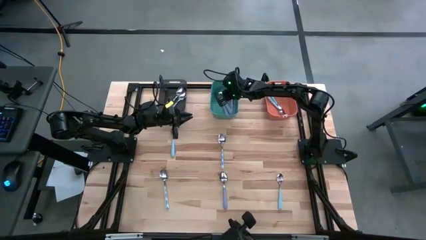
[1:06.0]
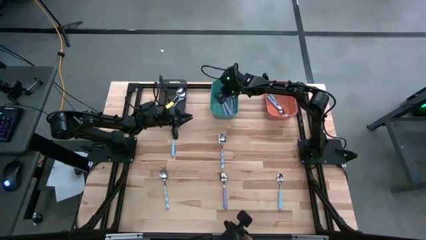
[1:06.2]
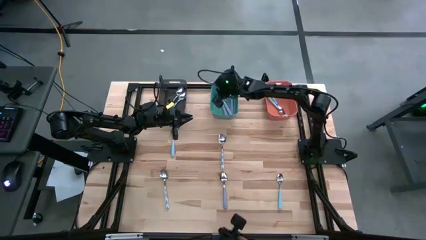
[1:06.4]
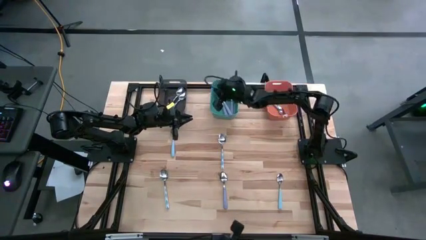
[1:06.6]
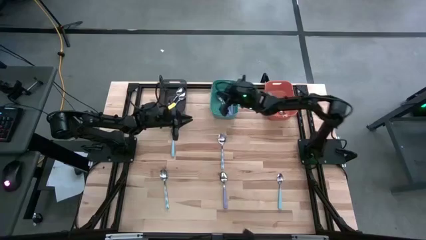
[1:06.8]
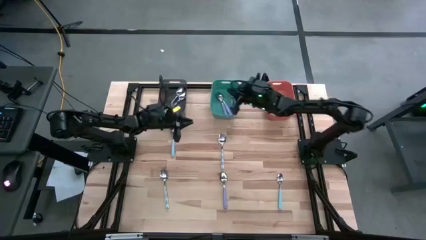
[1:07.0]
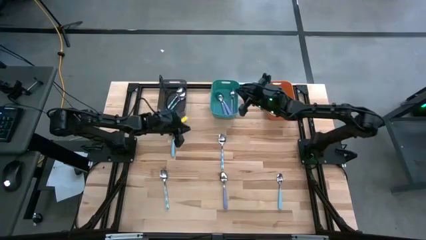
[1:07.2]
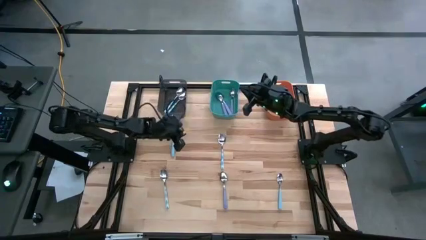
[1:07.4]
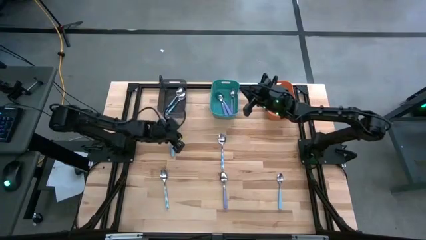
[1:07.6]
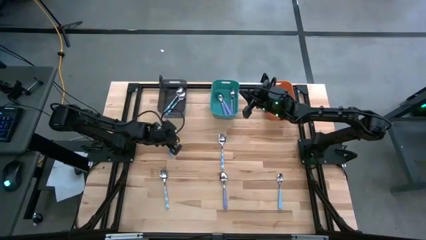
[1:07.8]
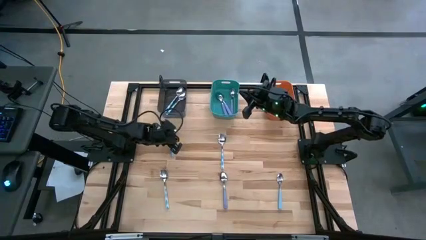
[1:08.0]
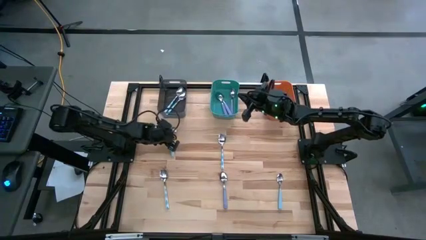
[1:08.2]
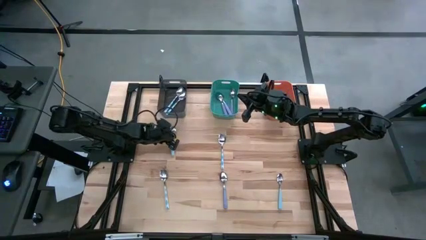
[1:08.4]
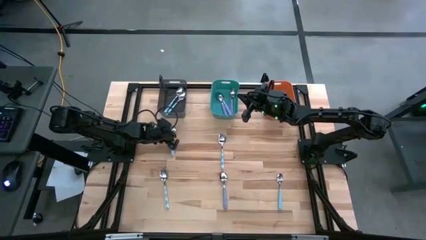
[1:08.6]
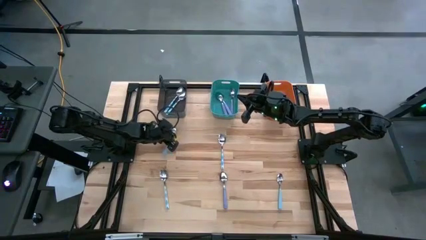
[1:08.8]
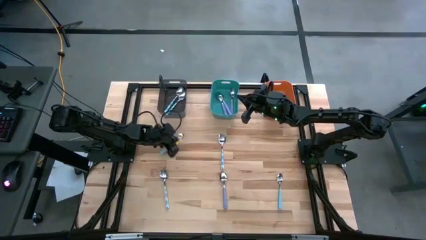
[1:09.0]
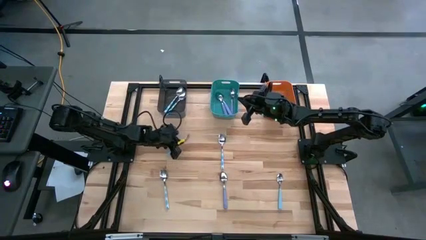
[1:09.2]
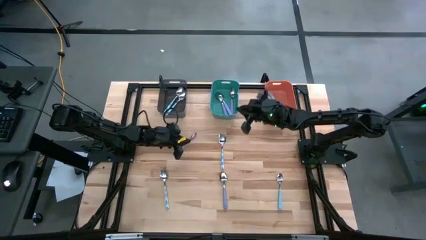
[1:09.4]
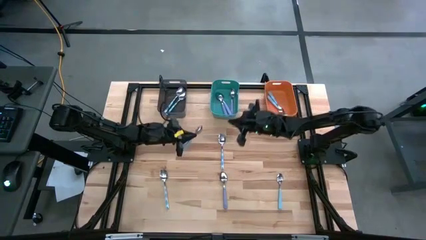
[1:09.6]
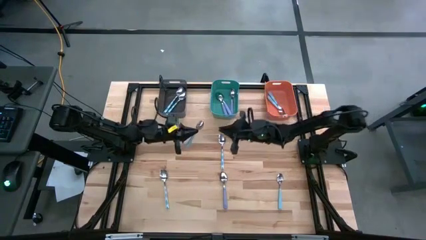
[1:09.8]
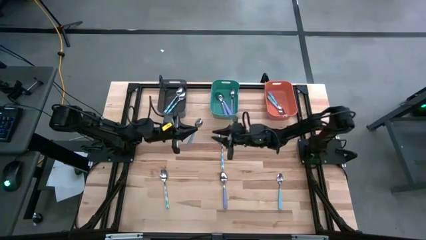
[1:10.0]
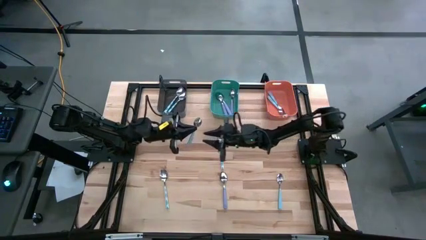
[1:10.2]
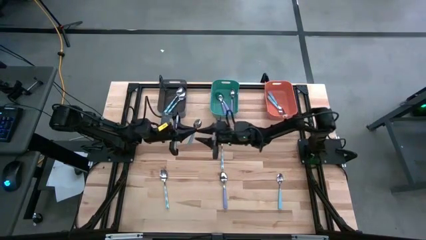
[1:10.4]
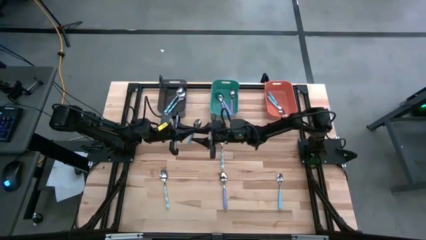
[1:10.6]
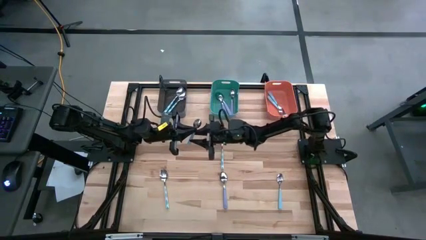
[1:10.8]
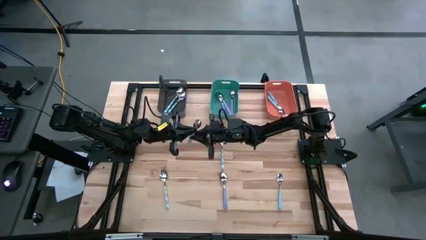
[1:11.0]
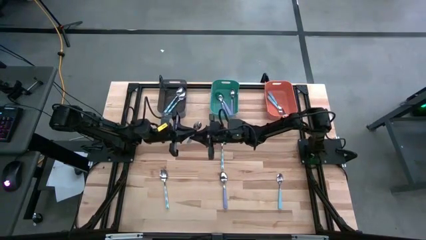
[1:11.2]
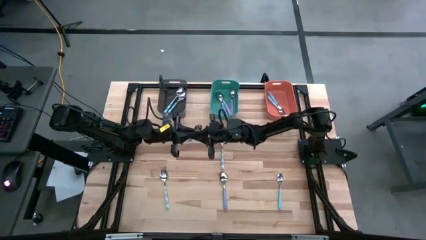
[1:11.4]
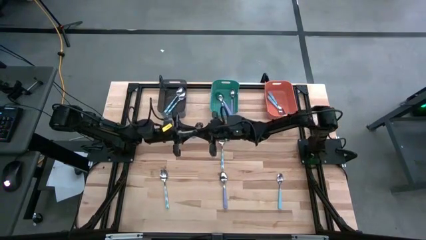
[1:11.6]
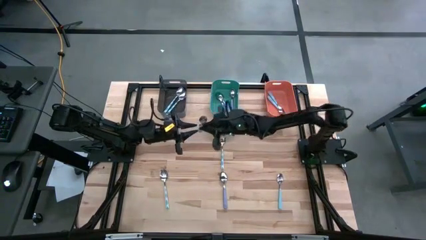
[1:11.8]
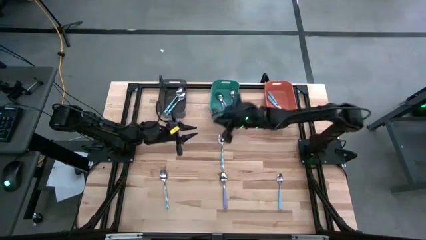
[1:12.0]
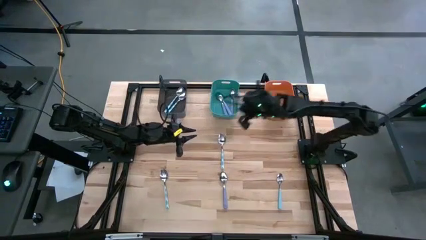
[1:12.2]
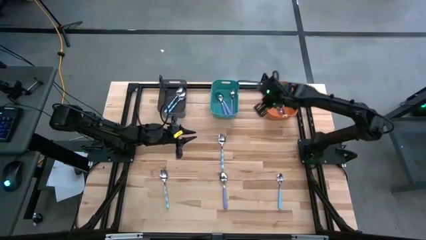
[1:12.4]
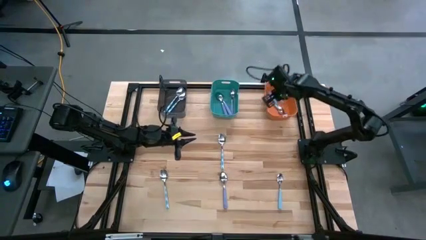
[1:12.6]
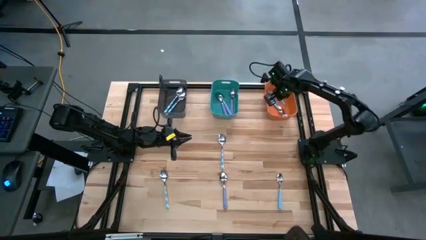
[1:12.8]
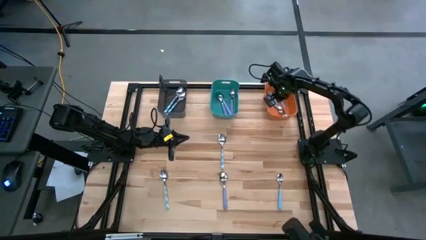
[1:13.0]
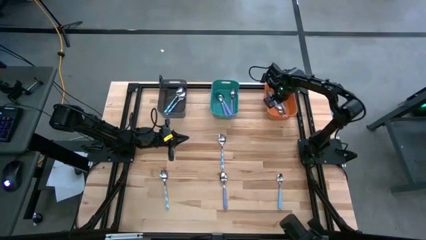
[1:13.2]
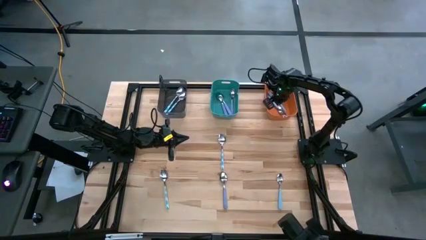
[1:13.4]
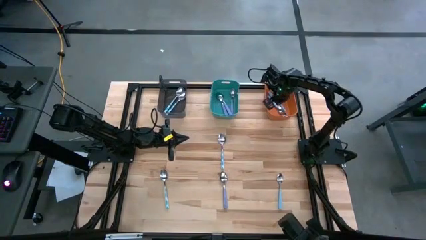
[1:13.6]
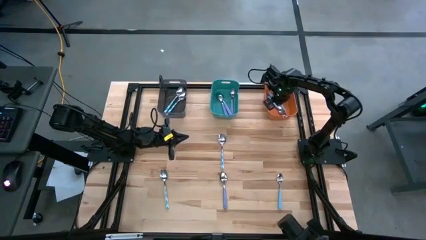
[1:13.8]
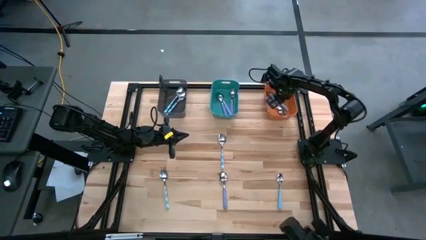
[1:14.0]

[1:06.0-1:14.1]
Task: Sort silverware by color (type)
Put the top blue spoon into the orange bin

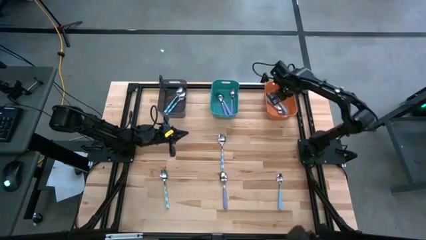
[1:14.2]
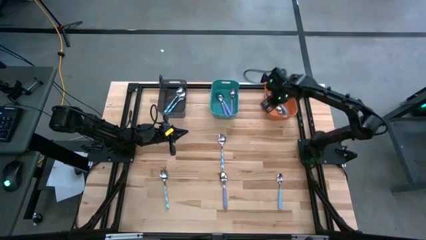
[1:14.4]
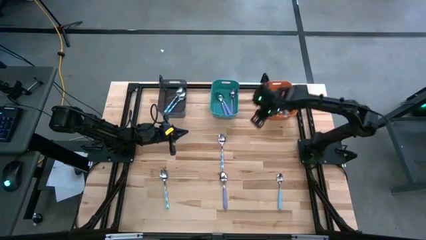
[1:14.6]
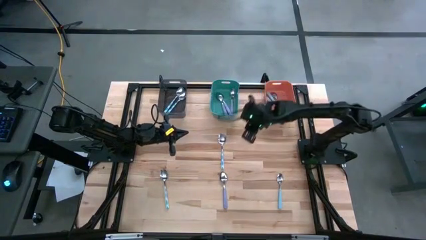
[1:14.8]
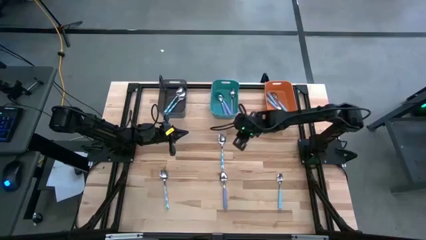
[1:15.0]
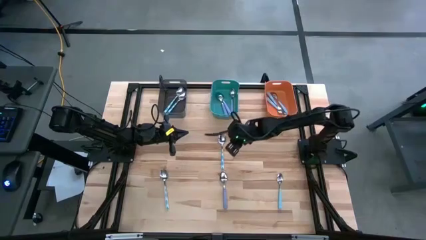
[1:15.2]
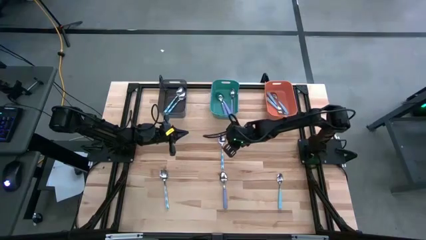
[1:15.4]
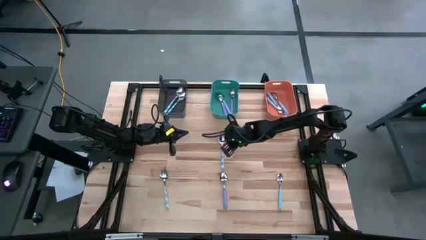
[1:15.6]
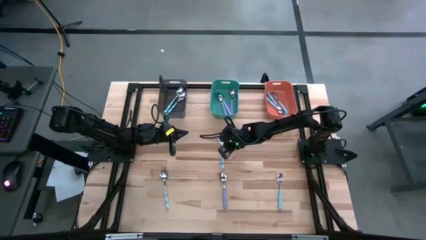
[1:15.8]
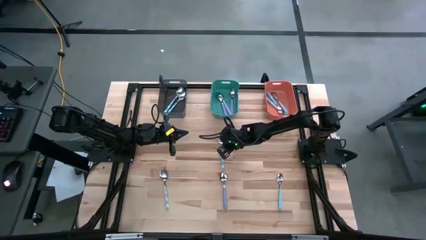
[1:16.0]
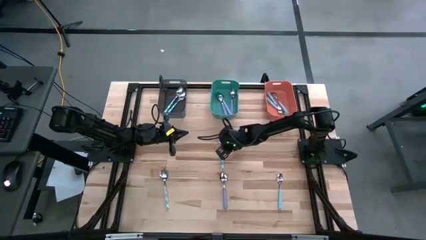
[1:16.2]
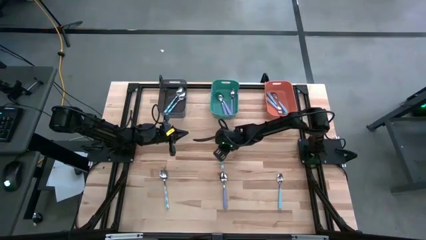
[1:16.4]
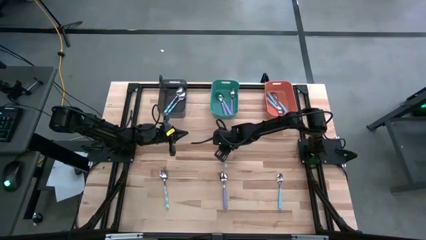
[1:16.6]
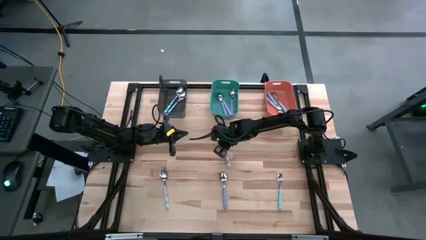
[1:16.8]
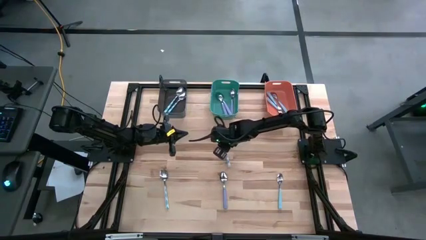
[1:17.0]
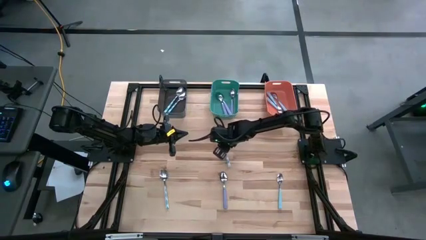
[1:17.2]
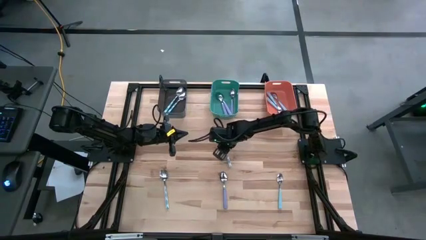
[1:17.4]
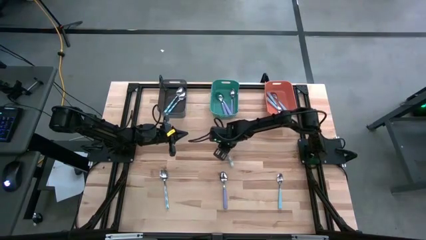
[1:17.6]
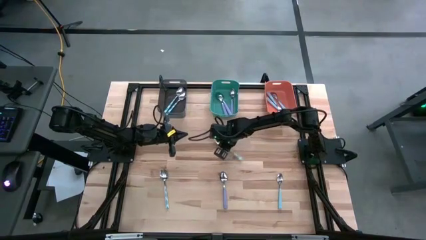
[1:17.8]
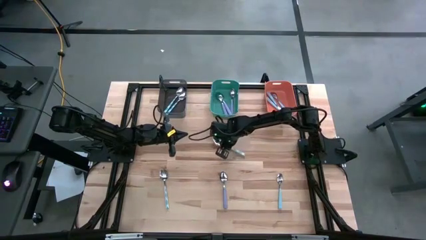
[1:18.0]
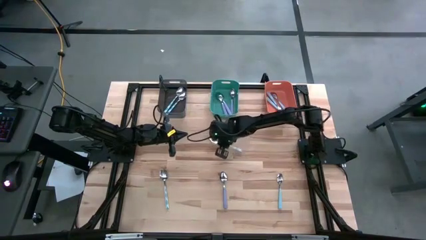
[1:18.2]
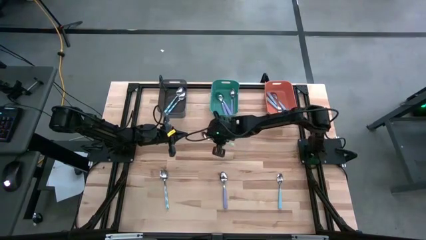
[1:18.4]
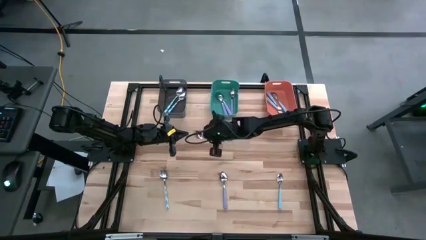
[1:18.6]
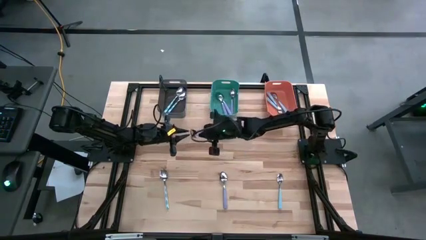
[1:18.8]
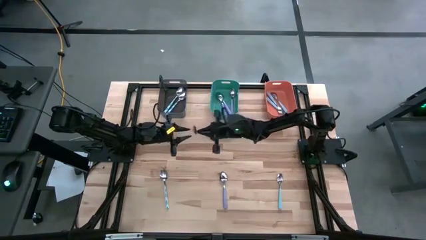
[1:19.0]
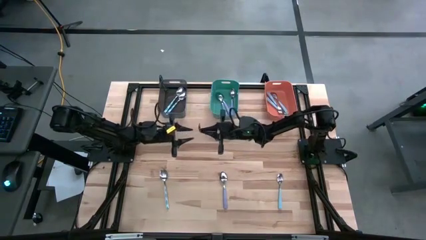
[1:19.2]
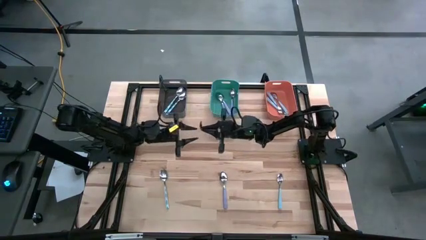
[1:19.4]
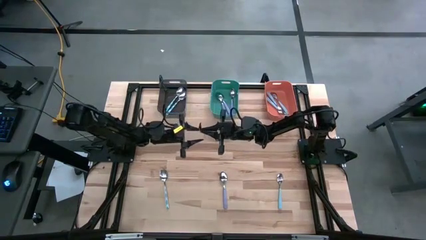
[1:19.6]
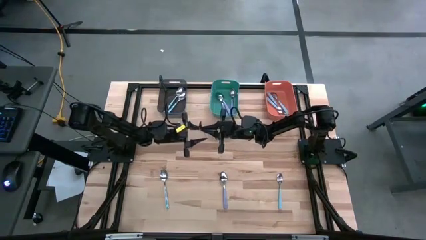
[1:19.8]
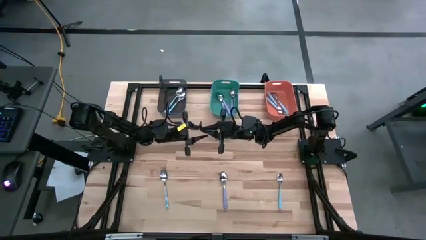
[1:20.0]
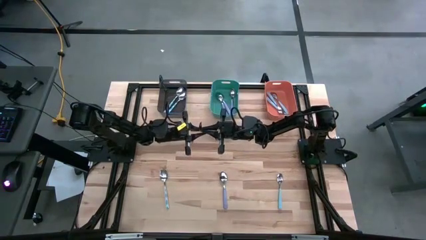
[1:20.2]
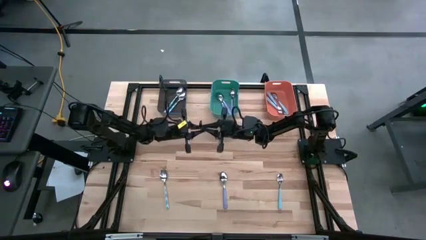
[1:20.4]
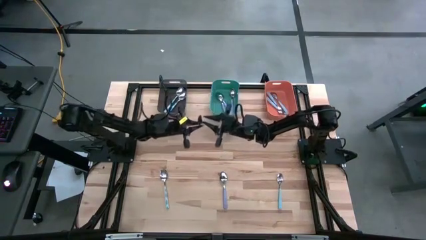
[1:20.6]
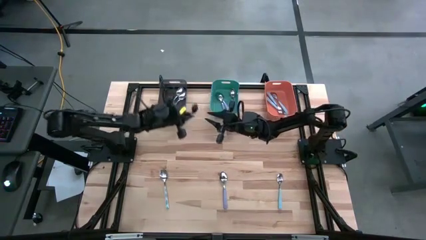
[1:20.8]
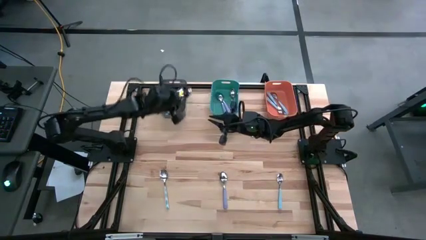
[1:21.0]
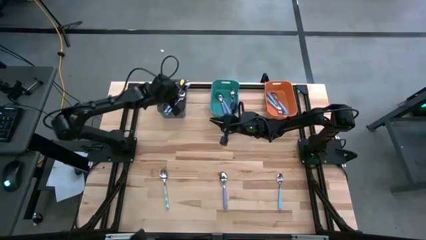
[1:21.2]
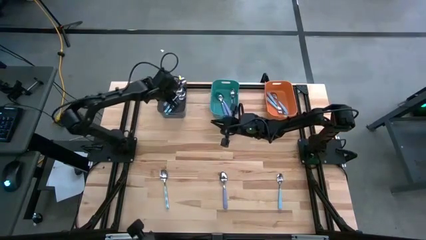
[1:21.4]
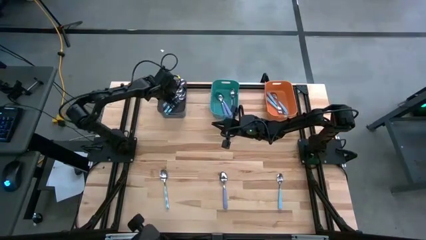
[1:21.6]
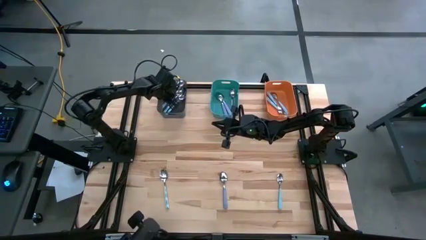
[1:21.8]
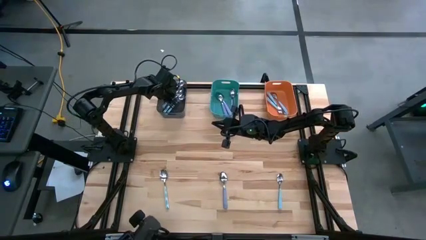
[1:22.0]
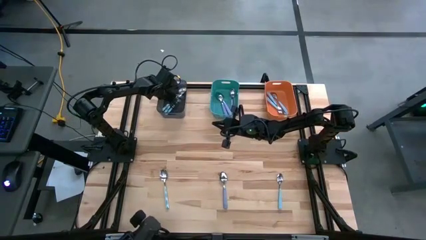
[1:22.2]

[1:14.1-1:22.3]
Put the top white spoon into the black bin

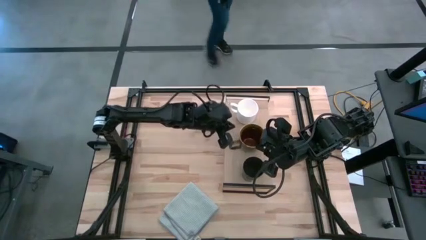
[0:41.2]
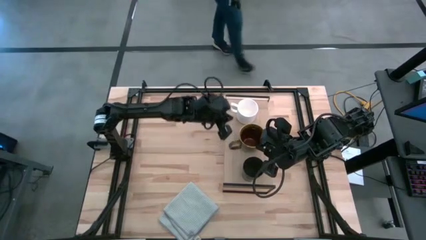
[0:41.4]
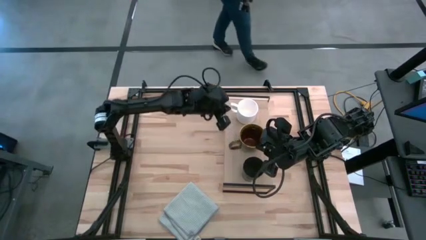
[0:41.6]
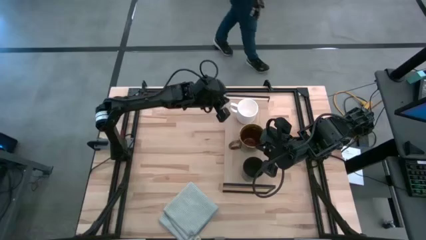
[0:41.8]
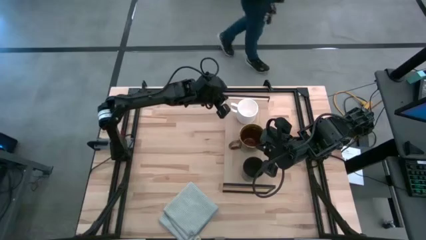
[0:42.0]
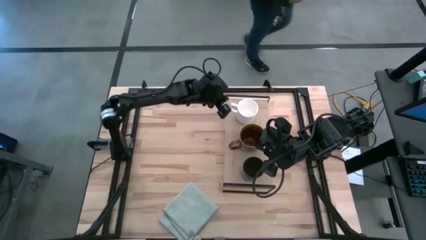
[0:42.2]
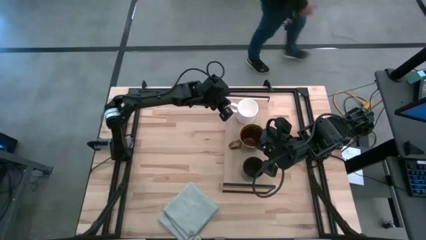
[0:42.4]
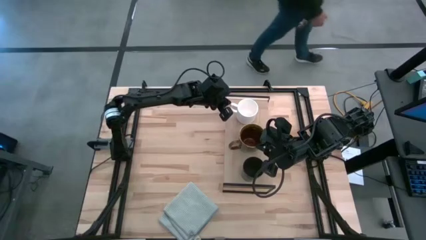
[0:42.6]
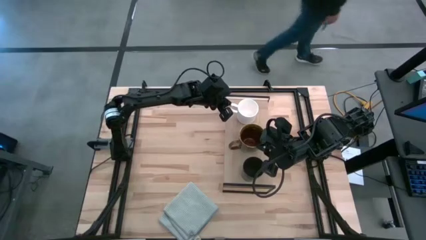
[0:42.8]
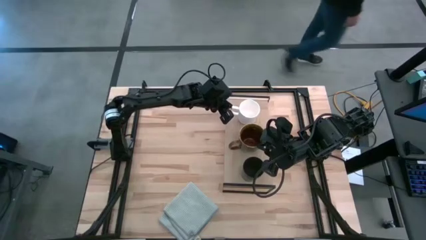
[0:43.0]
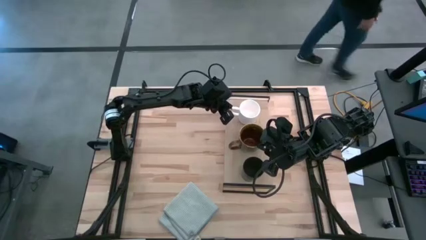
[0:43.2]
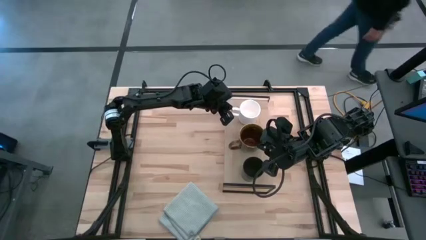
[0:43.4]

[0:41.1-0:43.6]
Task: Stack small to large cups/mugs on shelf
Adjust the white mug on the shelf
